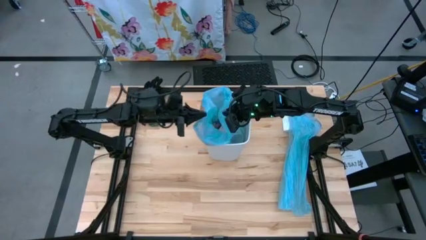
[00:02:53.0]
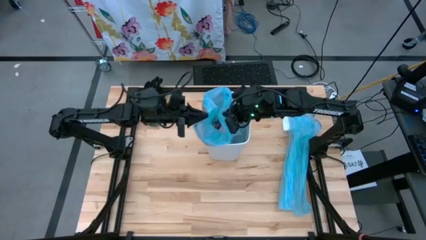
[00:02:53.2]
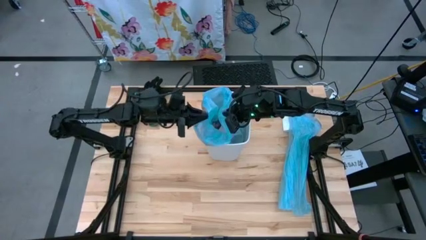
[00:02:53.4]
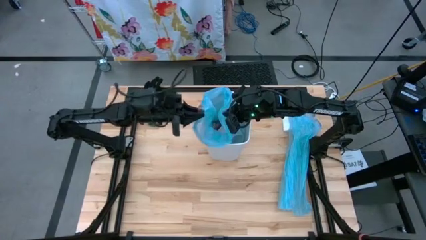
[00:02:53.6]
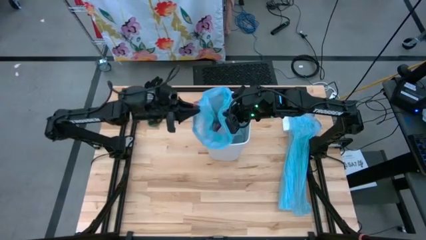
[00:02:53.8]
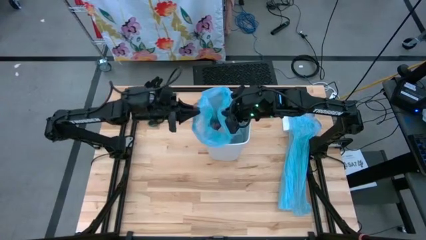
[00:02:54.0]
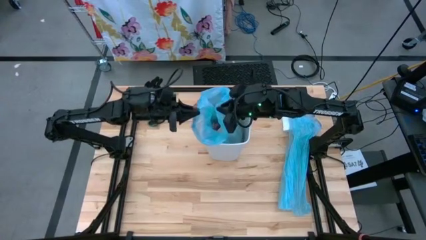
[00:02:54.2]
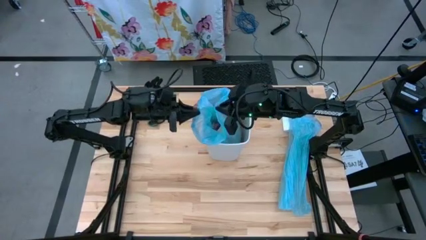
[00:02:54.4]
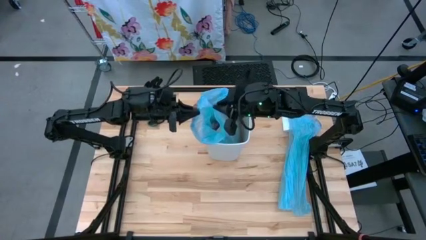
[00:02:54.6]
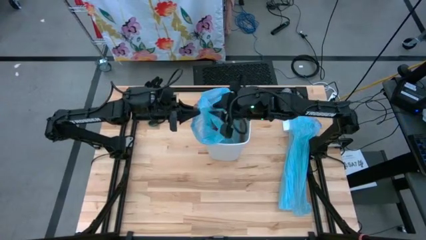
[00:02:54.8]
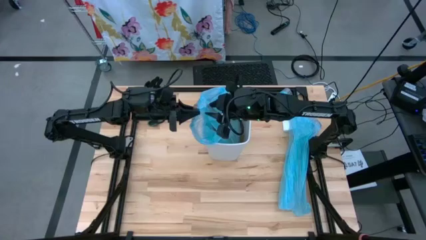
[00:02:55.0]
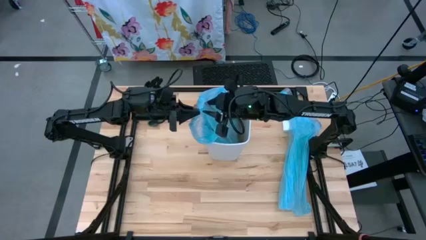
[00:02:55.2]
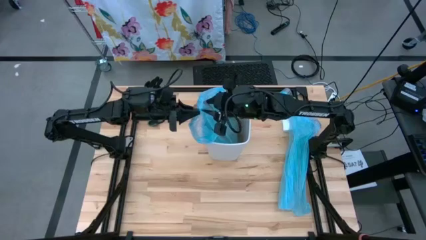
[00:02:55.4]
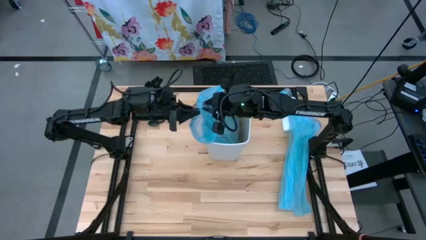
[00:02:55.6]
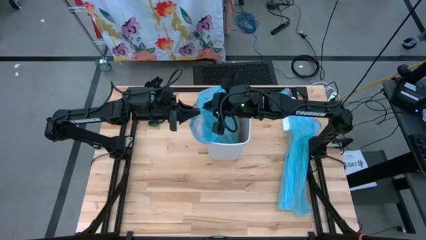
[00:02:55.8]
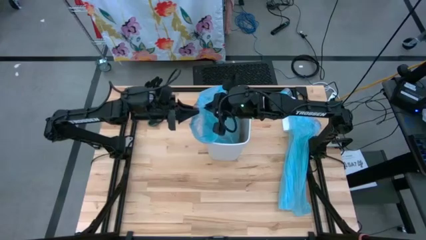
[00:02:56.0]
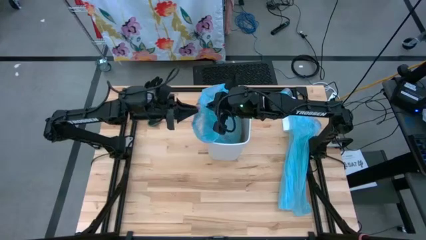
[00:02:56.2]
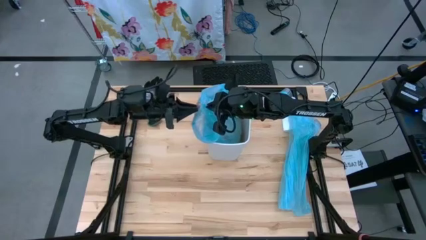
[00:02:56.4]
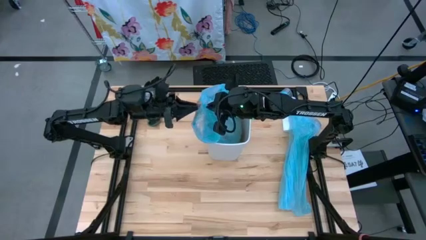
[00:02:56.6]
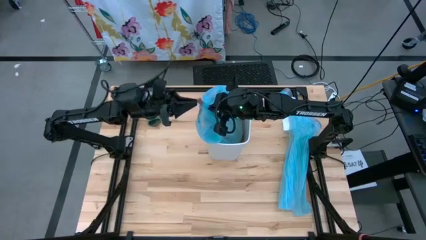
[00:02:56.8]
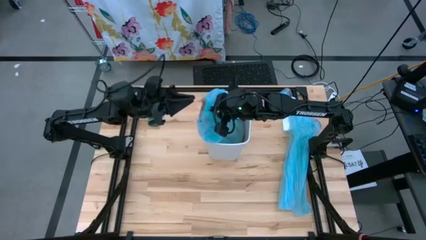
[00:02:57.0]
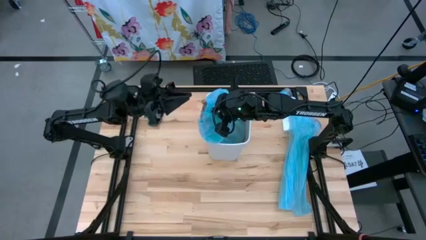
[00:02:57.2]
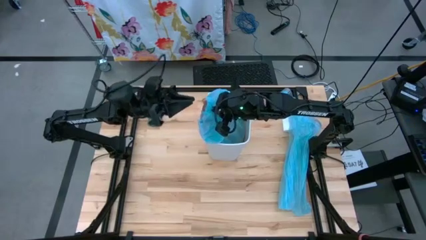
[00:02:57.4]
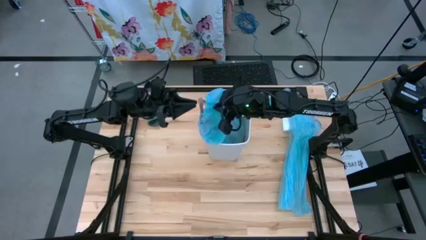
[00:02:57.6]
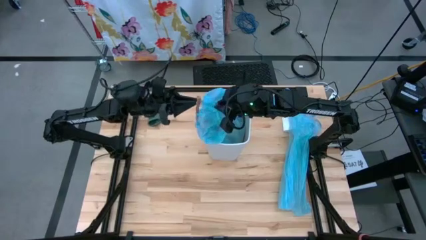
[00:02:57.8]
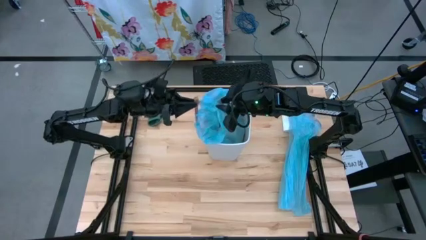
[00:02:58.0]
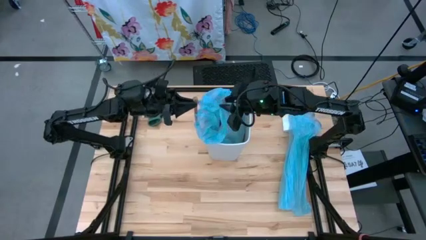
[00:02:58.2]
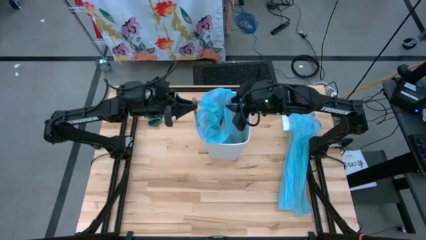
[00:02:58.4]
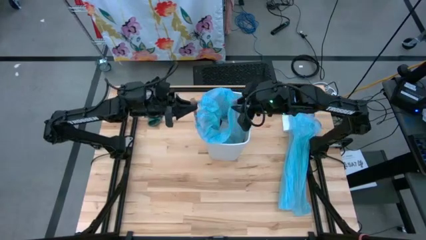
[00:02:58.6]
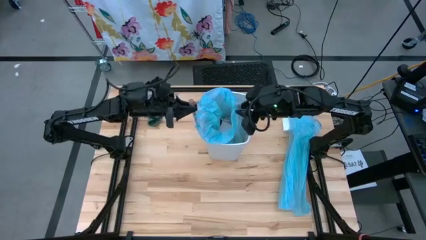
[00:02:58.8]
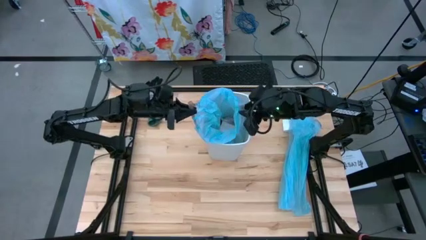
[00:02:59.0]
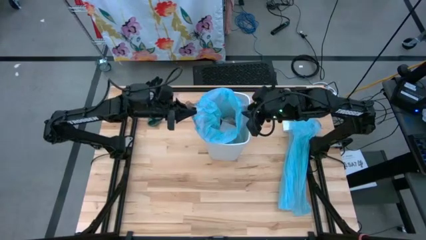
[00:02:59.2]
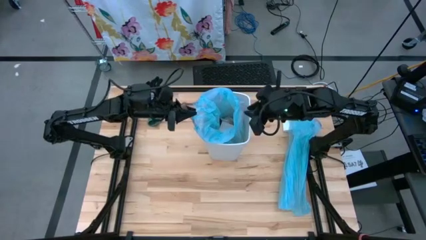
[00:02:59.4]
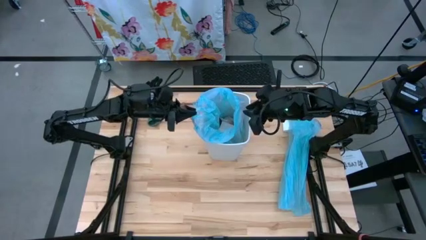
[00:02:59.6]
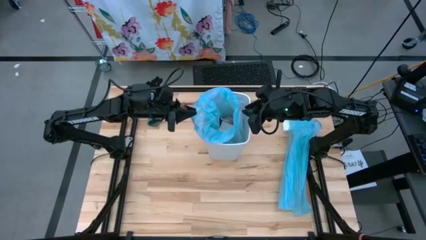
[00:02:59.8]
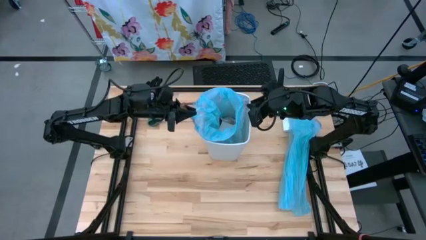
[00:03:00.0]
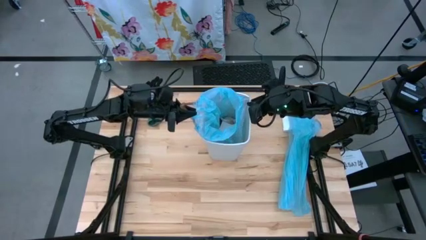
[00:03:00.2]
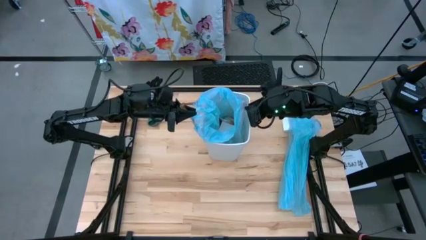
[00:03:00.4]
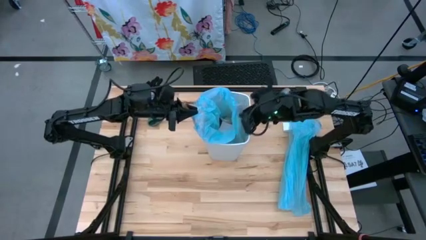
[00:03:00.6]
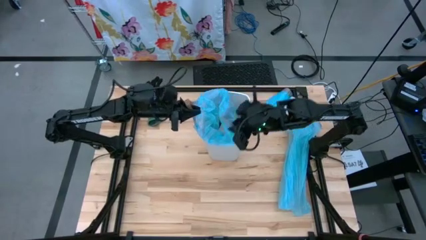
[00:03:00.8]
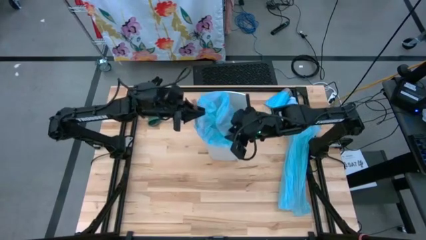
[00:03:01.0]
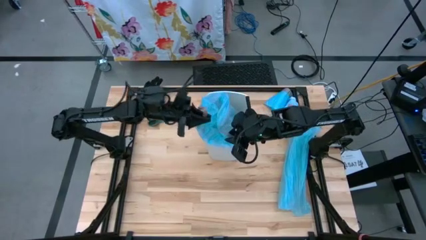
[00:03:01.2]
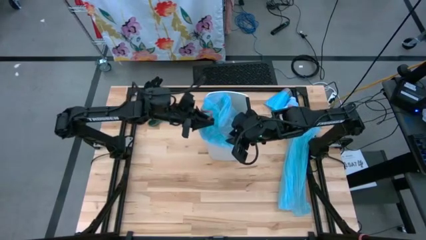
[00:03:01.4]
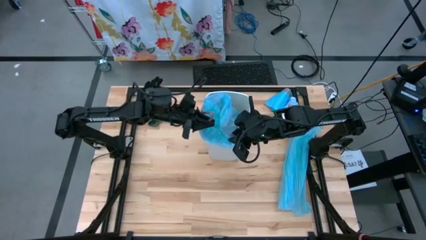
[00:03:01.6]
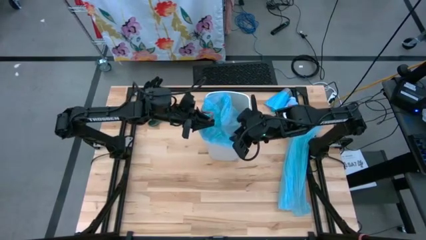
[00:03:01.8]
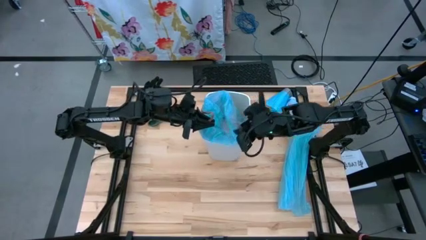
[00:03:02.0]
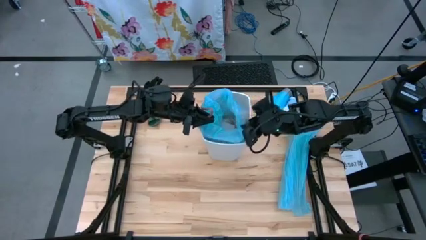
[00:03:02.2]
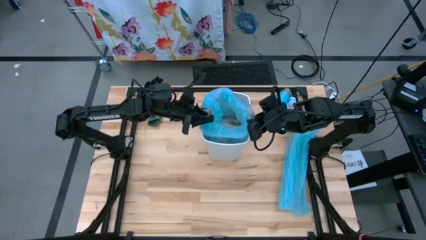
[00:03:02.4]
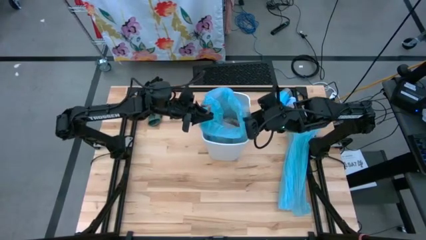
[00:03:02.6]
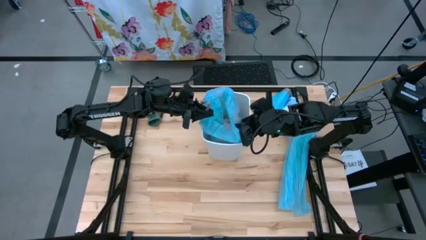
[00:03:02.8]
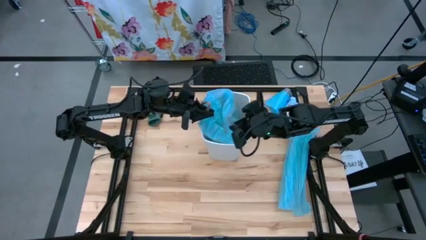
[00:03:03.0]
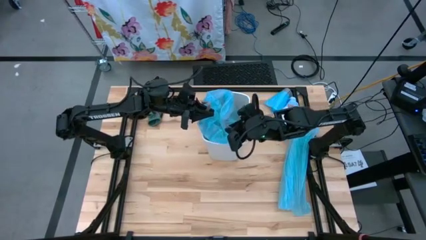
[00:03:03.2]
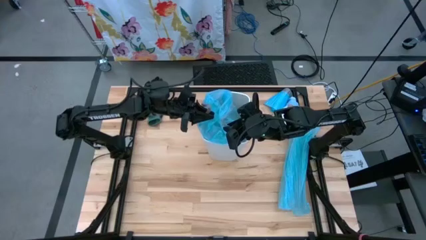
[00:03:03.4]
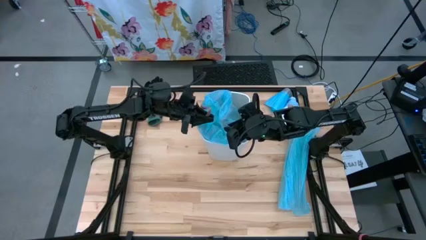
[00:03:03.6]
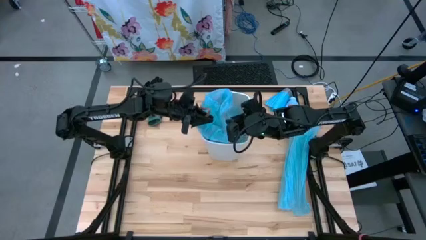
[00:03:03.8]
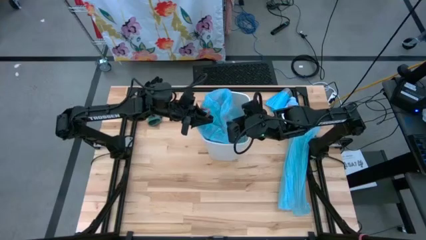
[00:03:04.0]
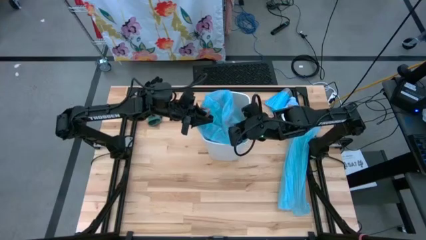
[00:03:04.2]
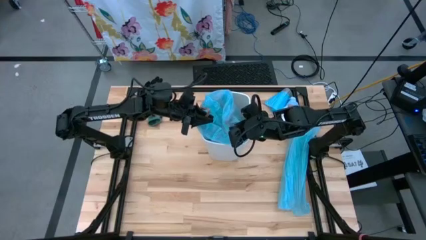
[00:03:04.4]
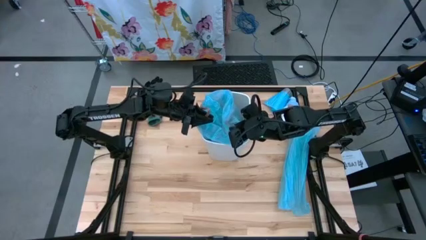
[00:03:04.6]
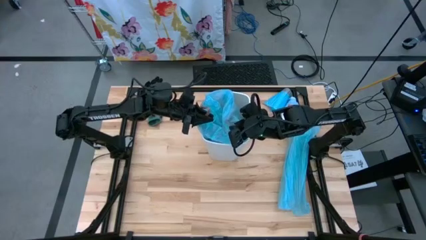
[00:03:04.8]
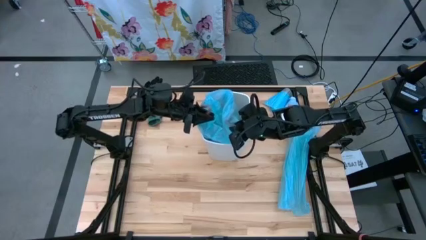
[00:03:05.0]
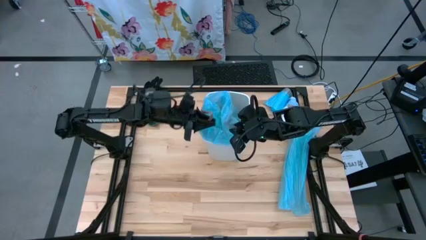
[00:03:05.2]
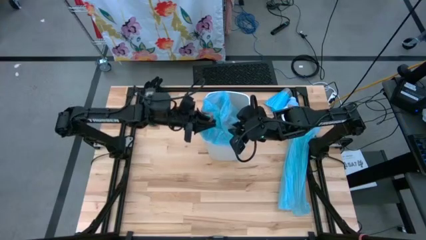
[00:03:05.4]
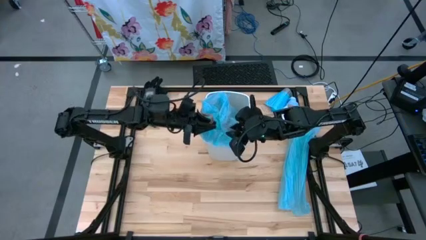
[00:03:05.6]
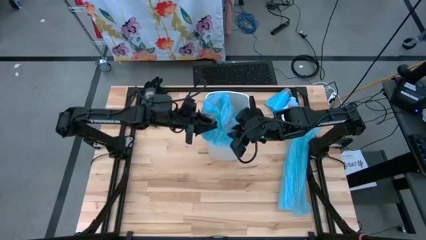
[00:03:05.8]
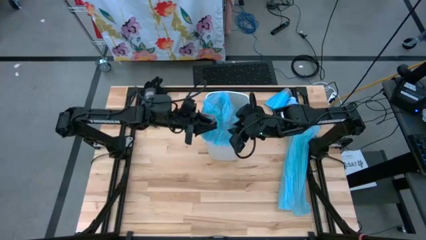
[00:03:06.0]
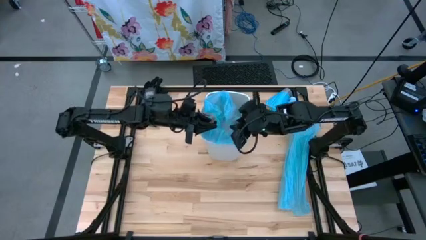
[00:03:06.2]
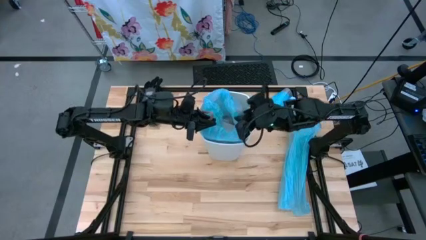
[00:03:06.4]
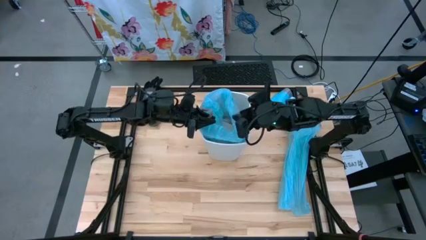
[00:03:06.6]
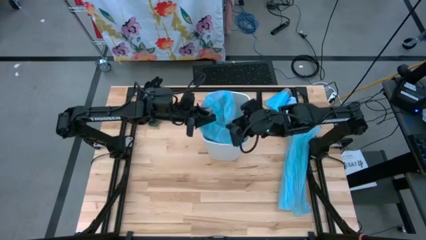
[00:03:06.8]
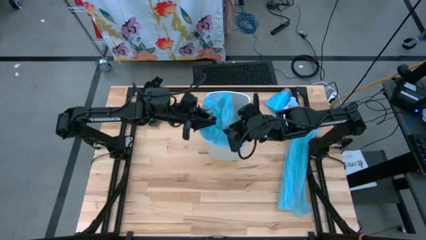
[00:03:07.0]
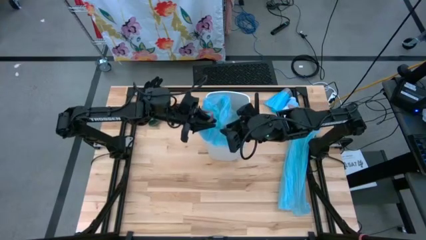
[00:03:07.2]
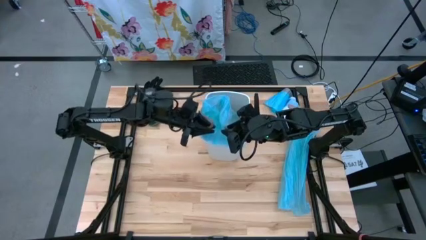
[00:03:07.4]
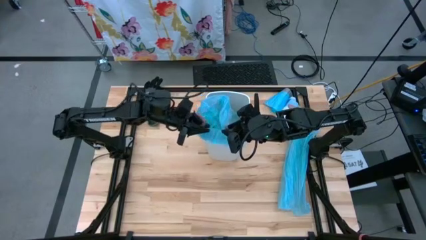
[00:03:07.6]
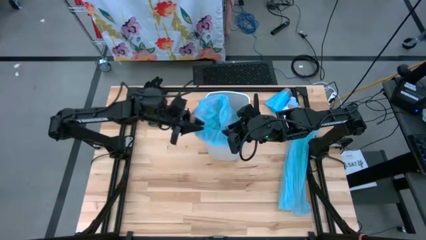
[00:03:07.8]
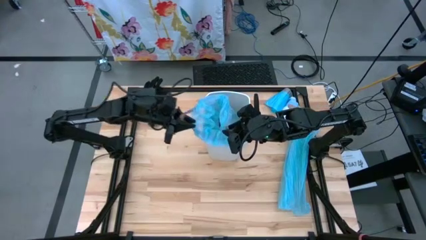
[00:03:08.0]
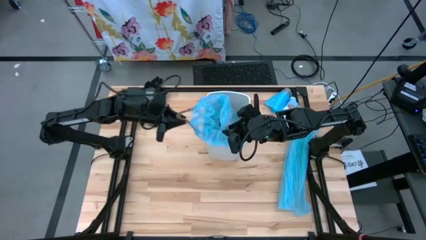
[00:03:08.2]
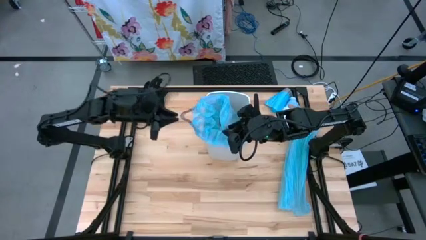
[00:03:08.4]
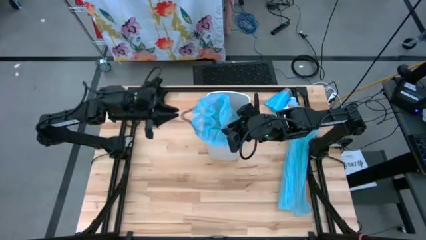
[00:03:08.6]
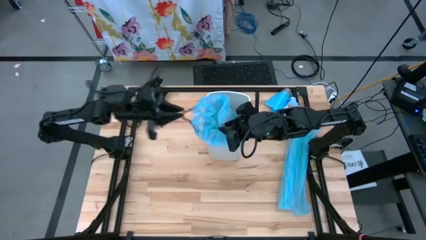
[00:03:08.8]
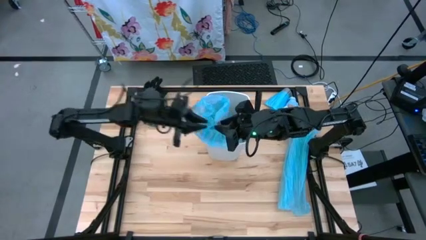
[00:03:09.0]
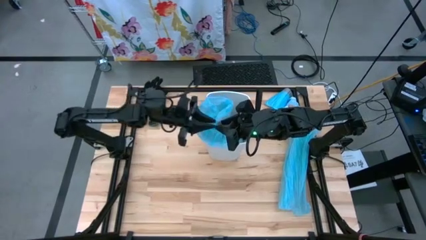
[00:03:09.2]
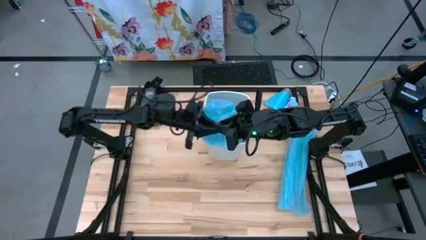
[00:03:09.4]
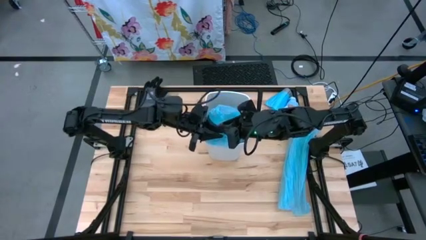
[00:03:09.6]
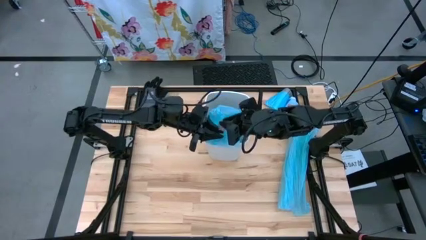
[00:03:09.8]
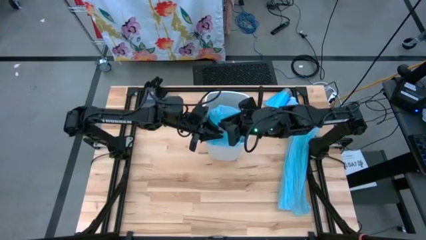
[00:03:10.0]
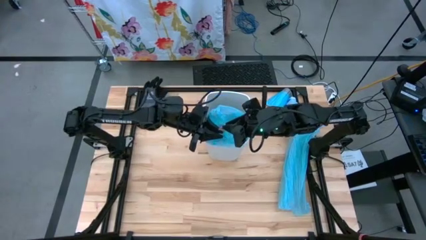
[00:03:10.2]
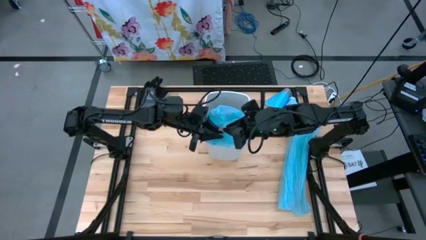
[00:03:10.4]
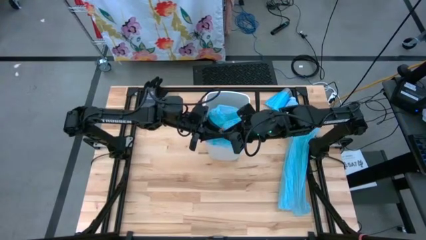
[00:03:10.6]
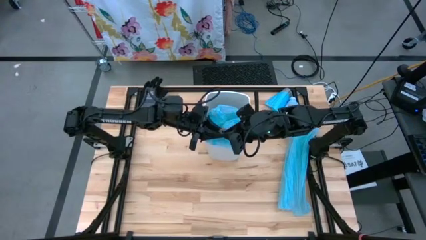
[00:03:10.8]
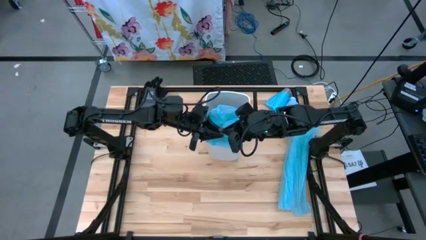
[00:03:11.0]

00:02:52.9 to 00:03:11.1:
Task: place trash/remove bag and relplace
Close the trash bag
